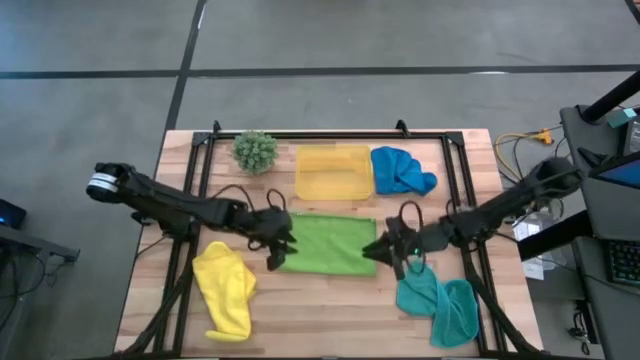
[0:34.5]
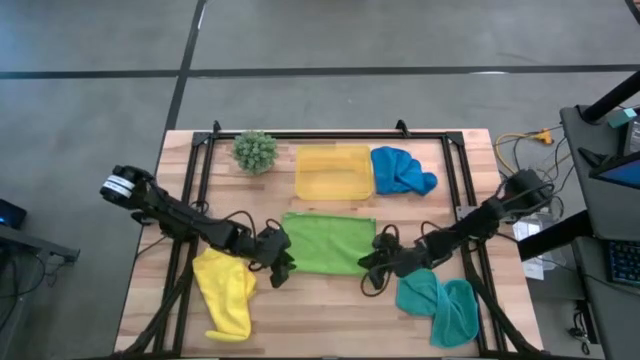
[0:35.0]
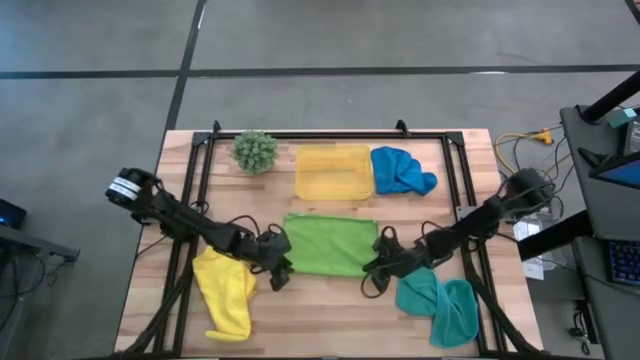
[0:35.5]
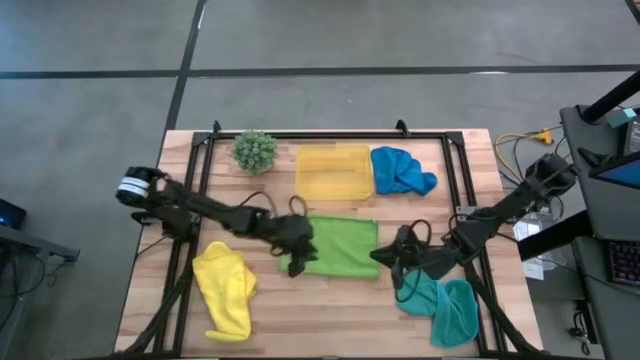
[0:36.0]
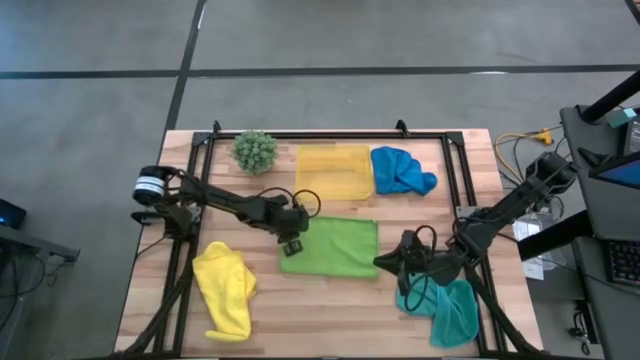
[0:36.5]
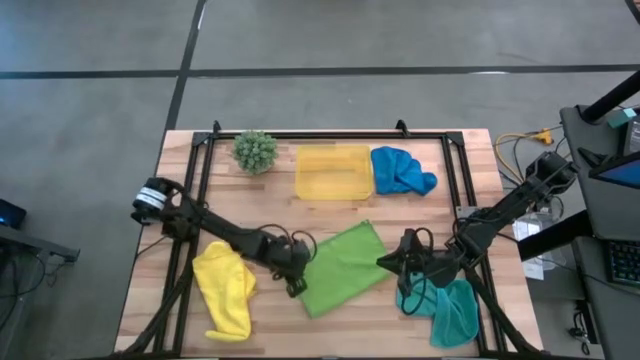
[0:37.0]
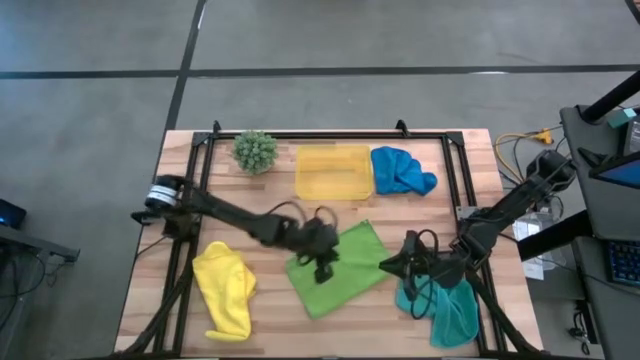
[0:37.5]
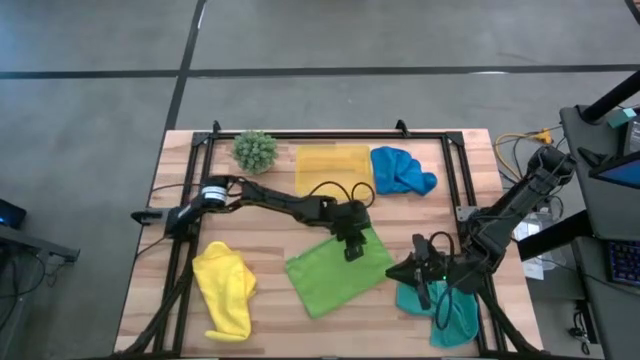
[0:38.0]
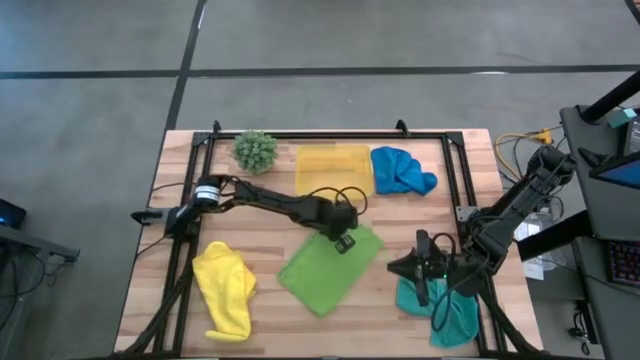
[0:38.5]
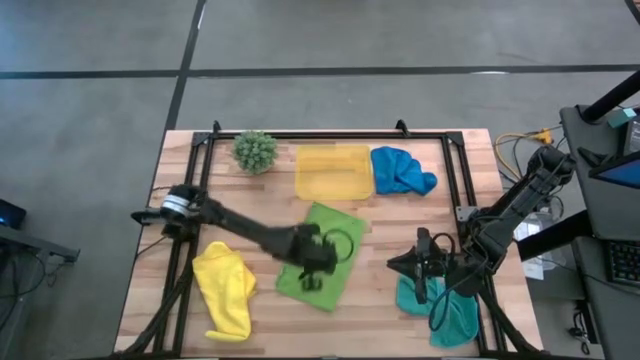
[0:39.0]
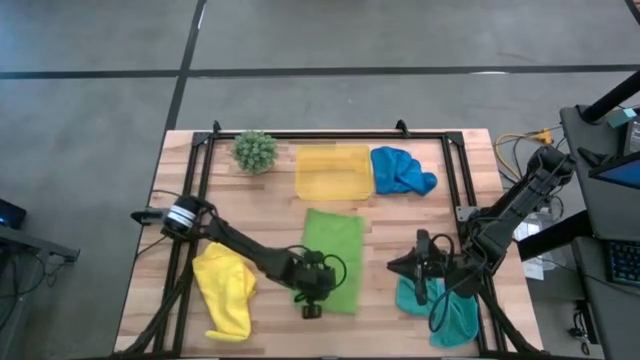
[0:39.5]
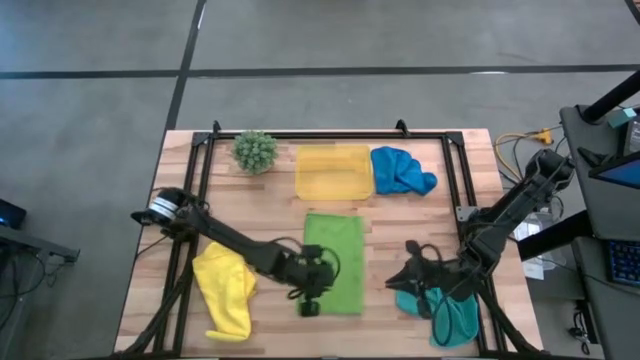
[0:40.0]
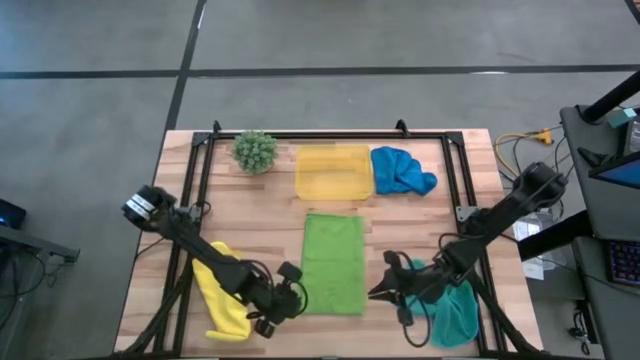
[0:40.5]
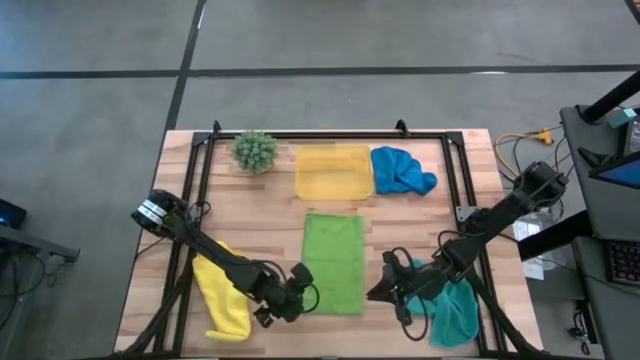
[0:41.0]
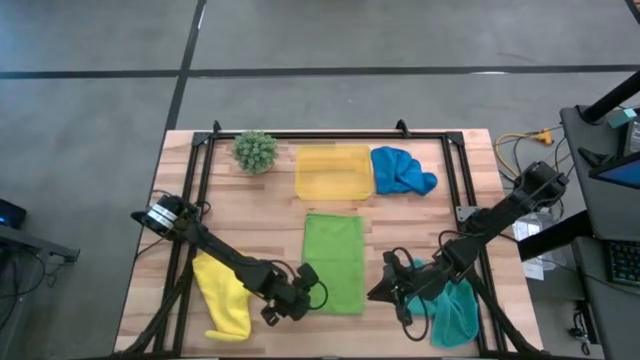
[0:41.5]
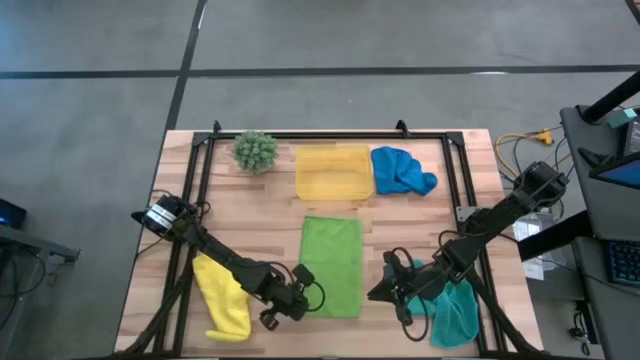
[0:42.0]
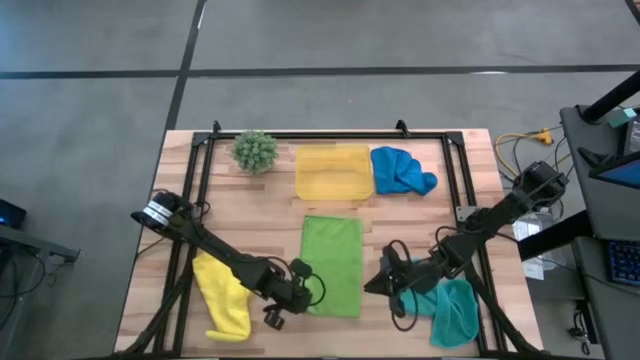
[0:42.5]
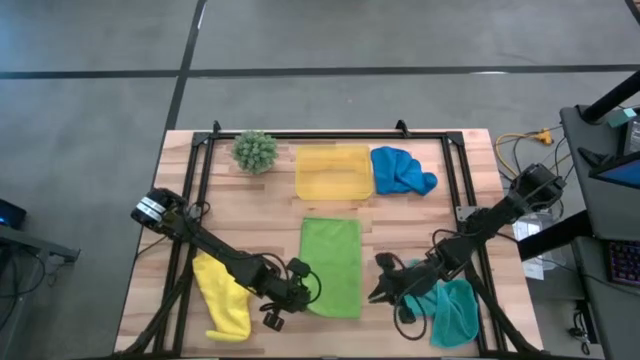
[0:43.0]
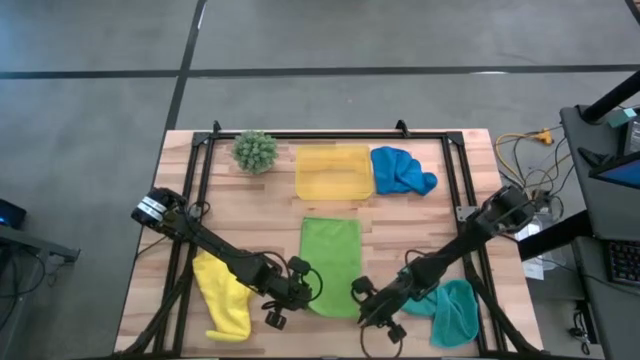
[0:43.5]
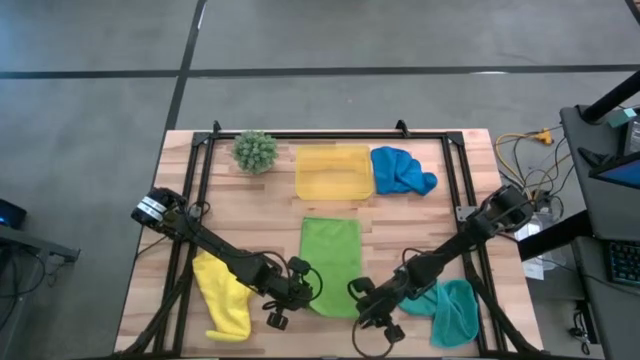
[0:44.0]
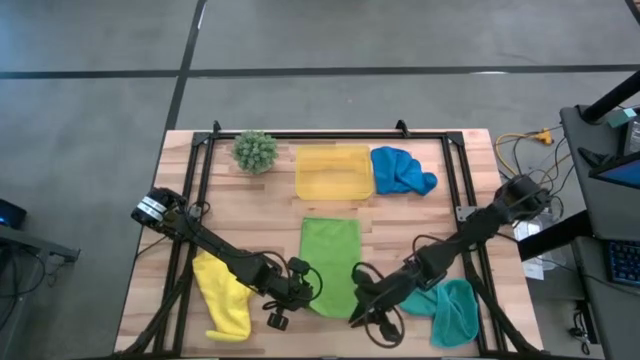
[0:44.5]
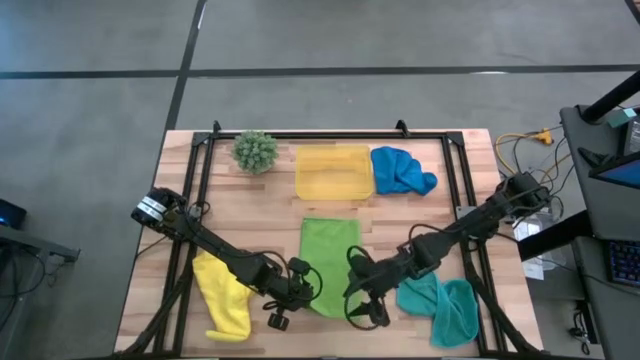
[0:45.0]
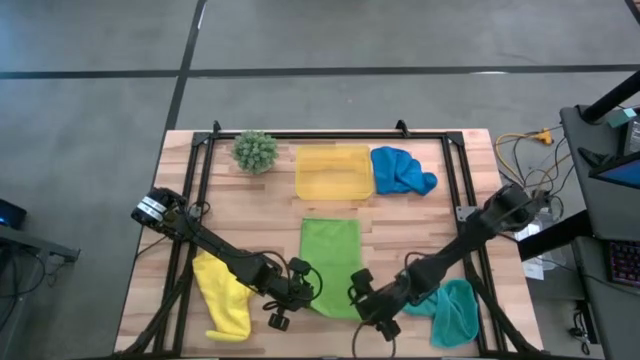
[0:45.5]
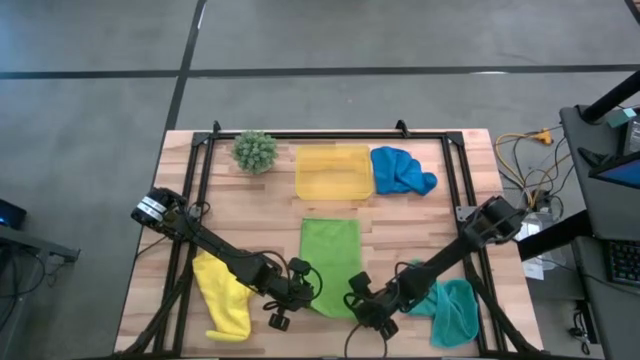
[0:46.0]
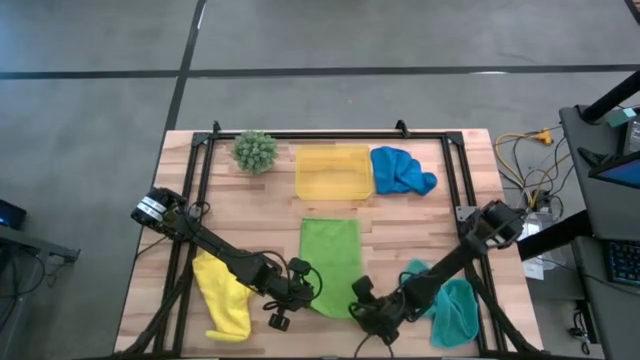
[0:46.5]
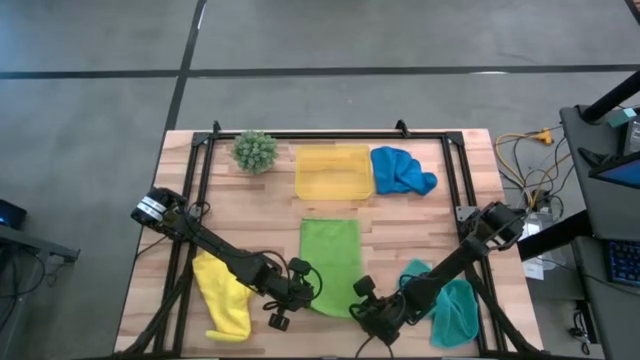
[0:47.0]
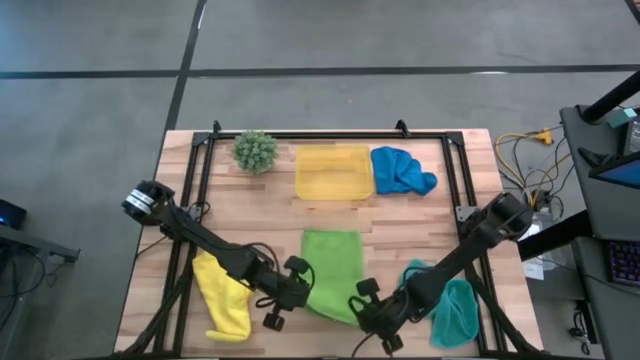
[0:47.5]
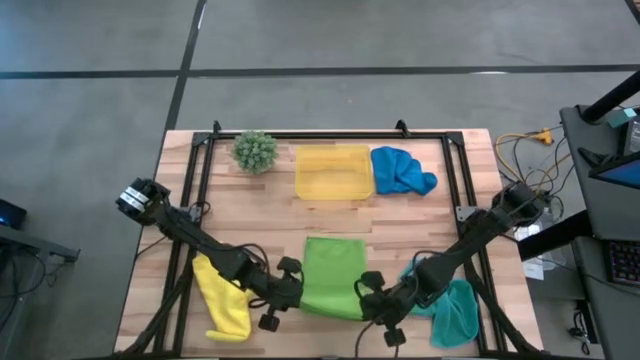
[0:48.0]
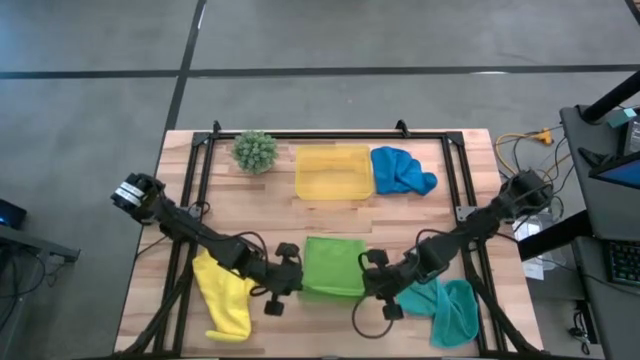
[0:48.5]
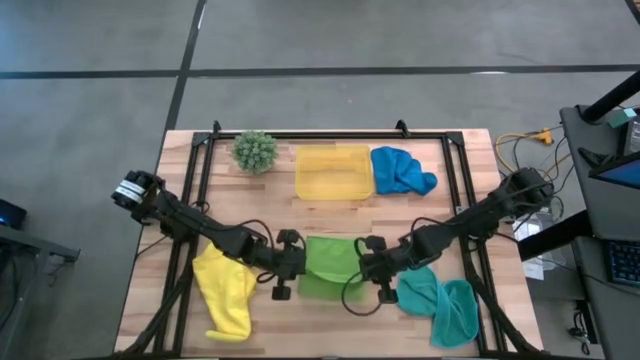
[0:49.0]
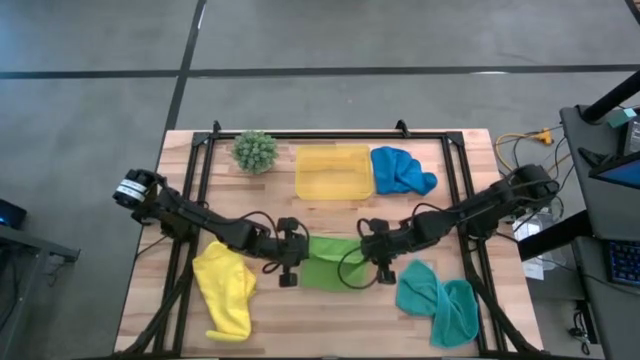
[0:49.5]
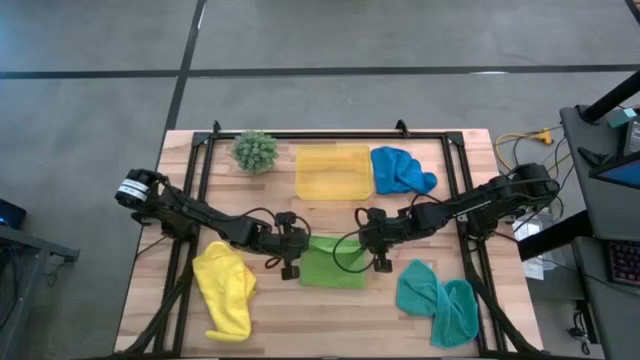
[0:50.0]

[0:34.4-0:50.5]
Task: Fold microfiber towels
Fold the green towel

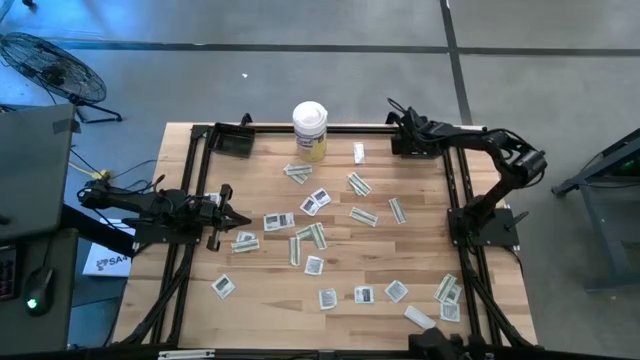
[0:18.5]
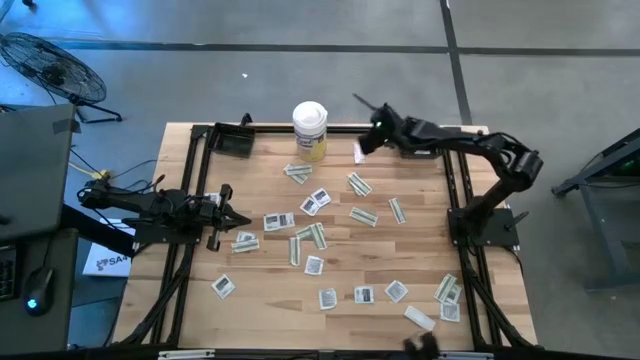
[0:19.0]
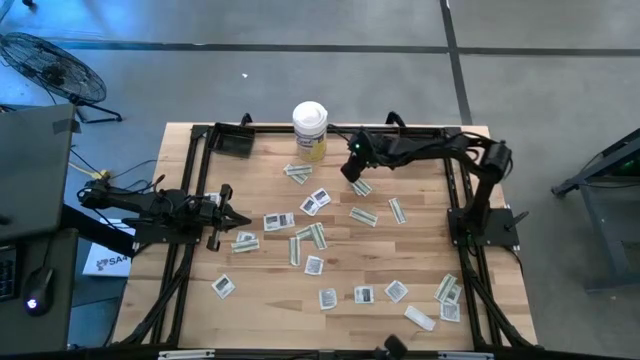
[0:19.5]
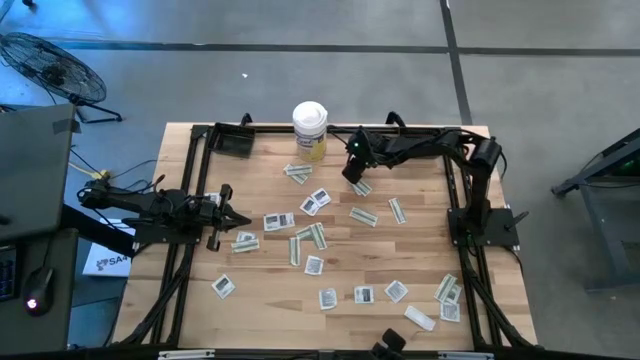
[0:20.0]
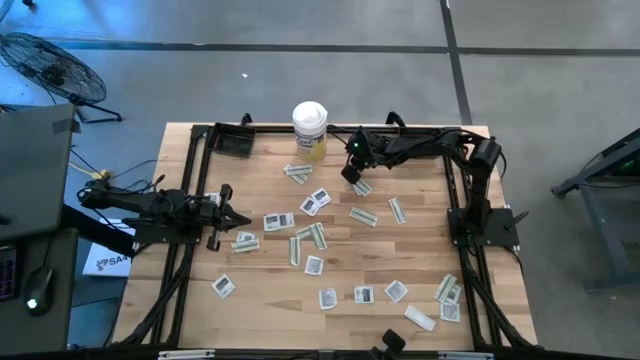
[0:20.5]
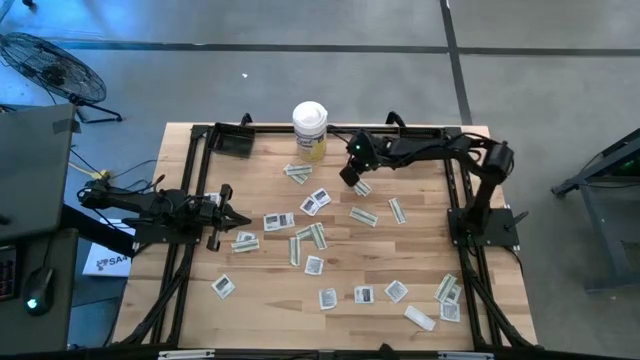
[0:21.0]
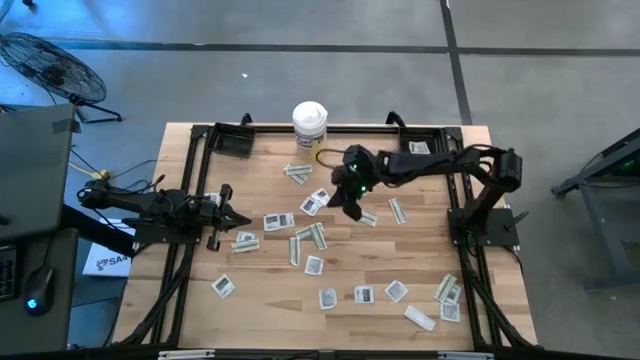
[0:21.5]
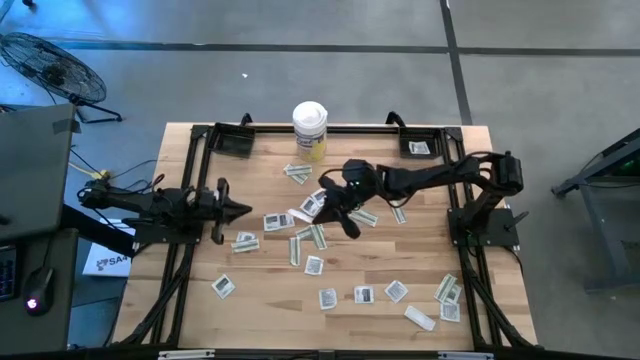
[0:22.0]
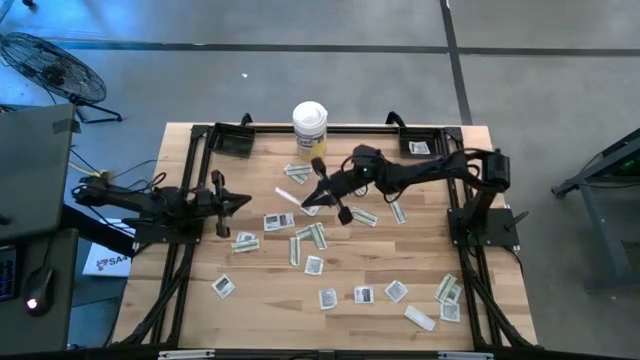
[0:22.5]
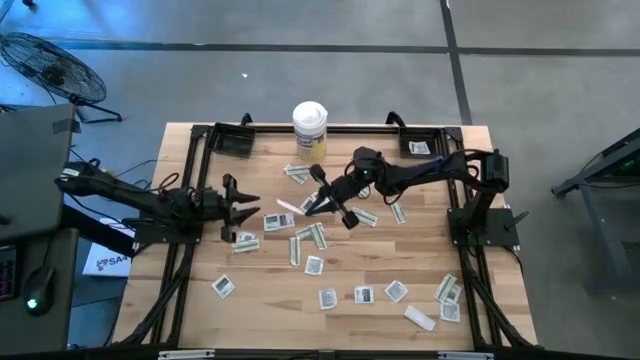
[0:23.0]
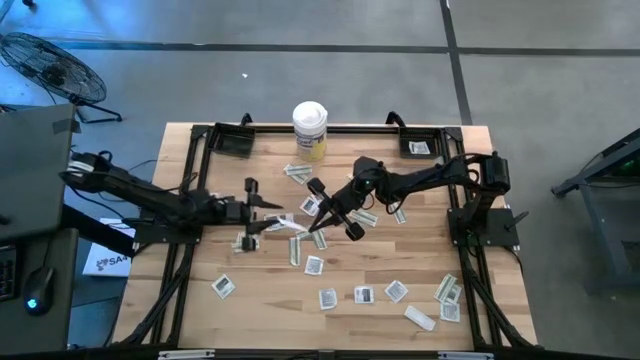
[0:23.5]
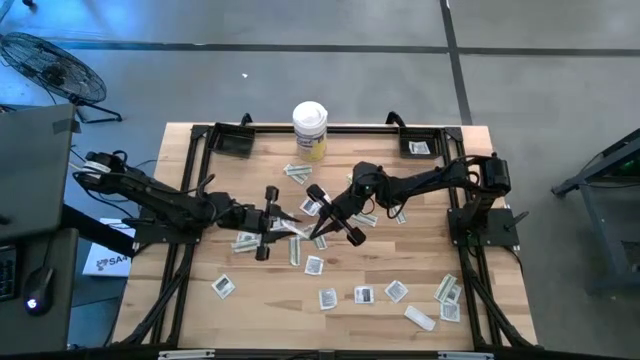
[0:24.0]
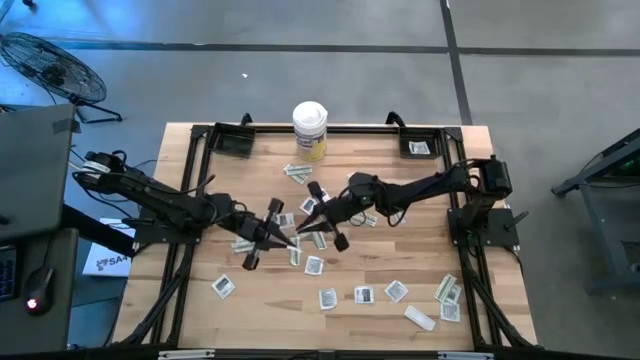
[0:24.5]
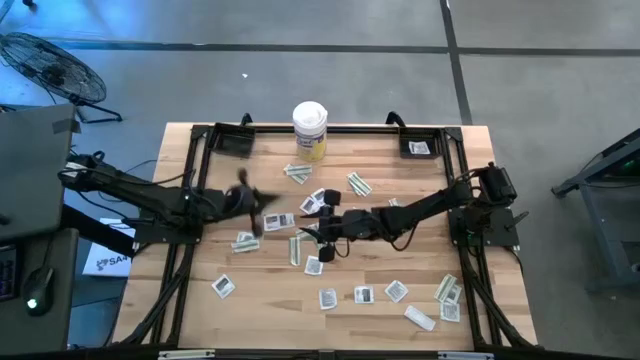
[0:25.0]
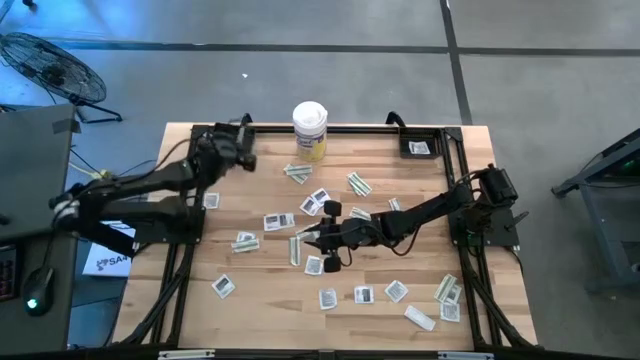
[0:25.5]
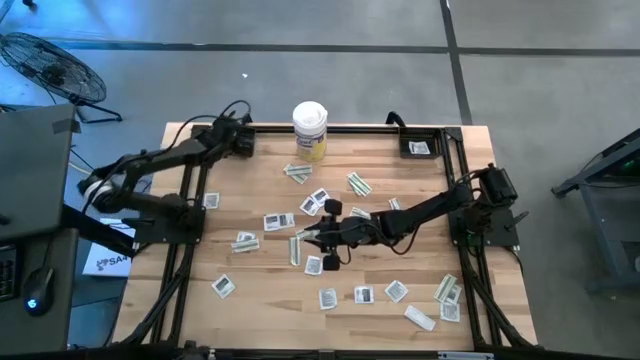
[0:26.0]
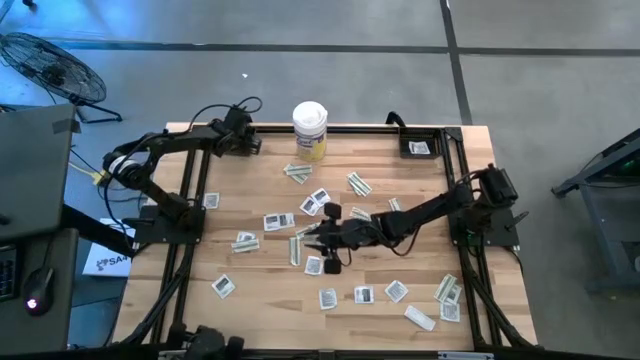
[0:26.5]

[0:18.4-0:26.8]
Task: Pick & Place First Aid Supplies
Put the green bandage pack into the left black basket
